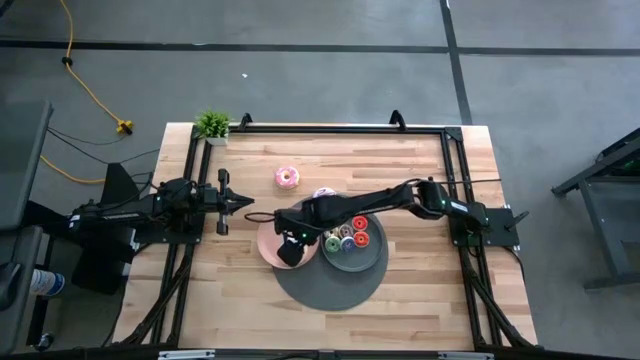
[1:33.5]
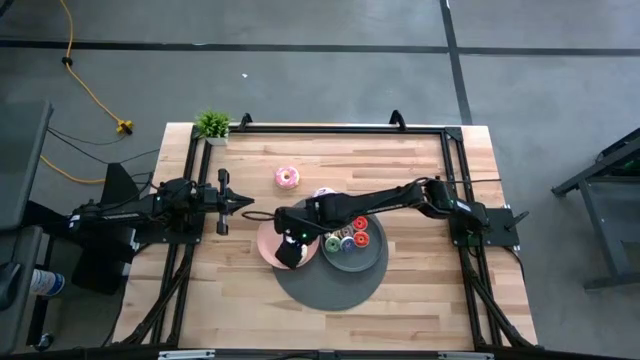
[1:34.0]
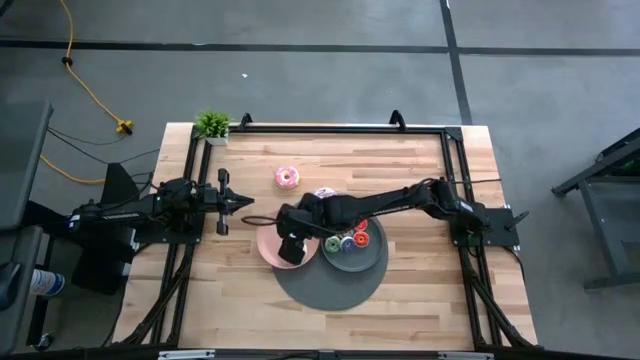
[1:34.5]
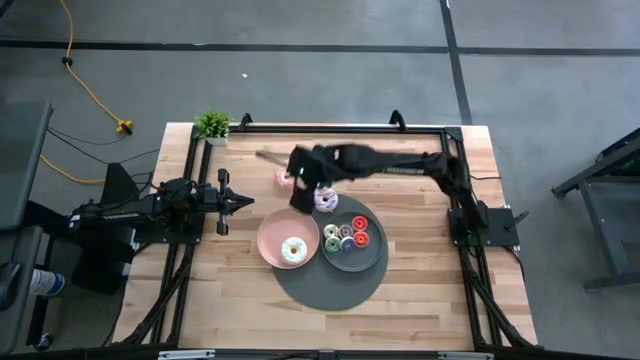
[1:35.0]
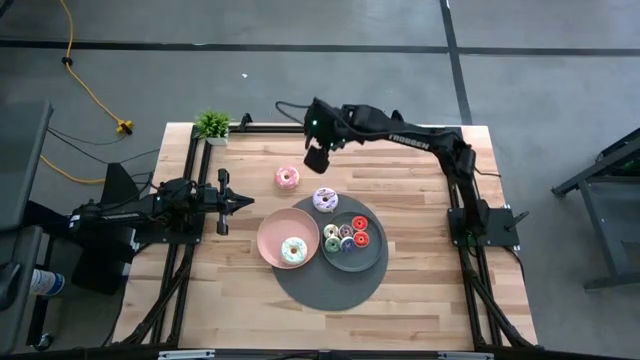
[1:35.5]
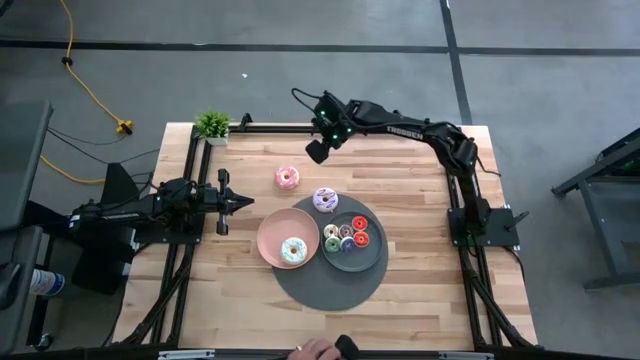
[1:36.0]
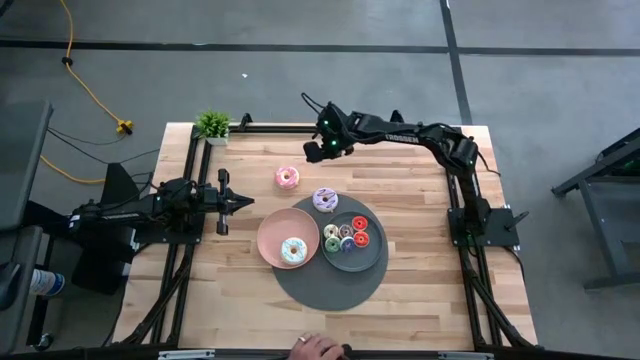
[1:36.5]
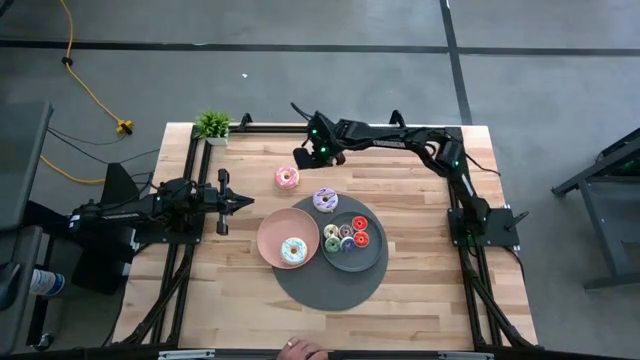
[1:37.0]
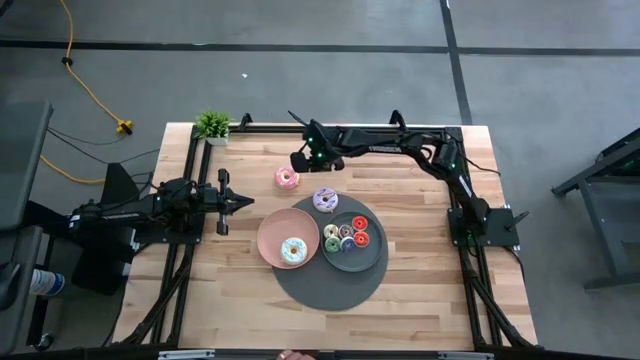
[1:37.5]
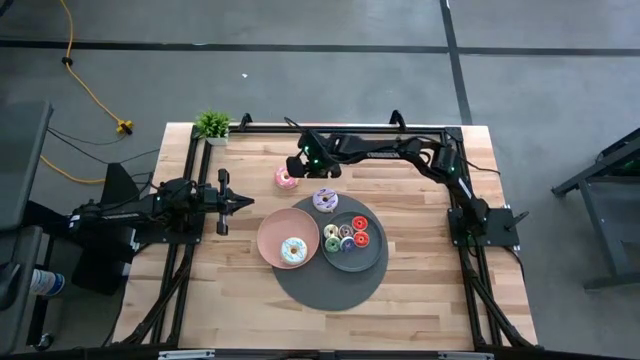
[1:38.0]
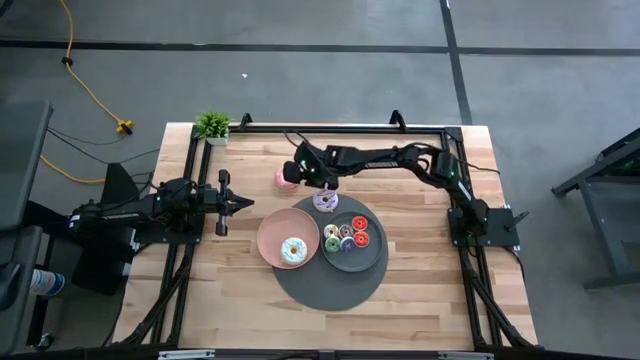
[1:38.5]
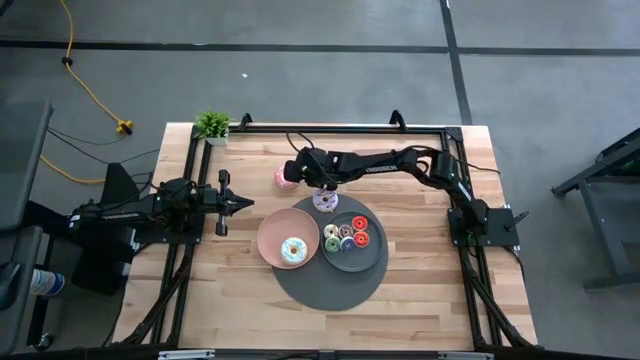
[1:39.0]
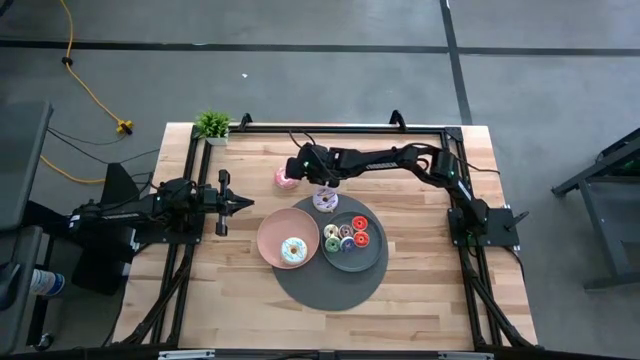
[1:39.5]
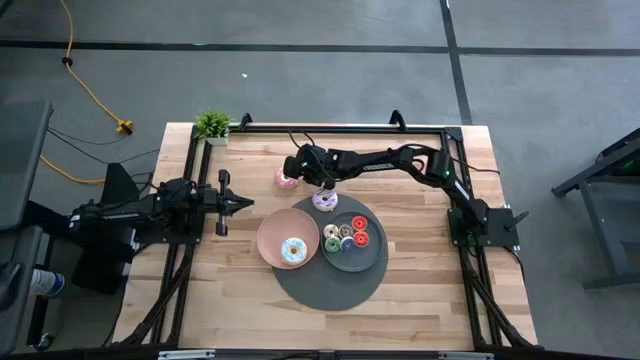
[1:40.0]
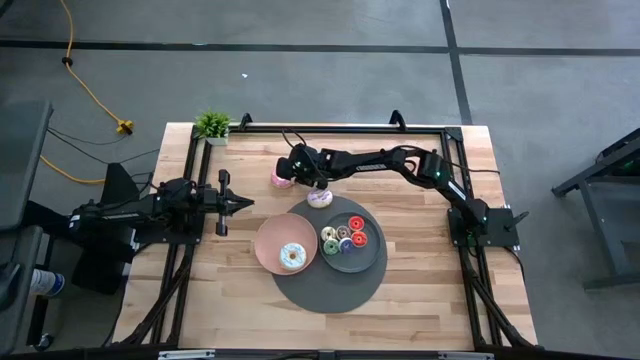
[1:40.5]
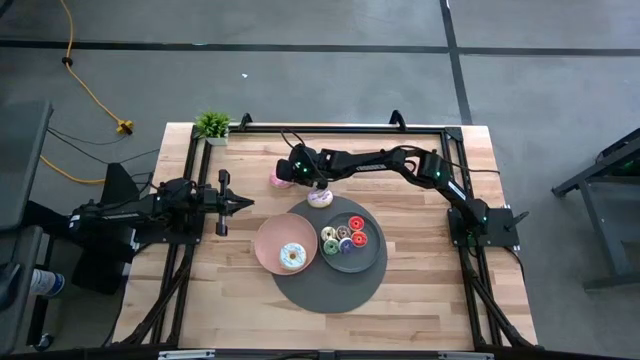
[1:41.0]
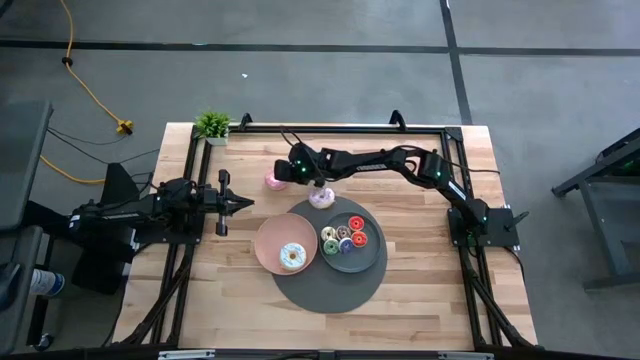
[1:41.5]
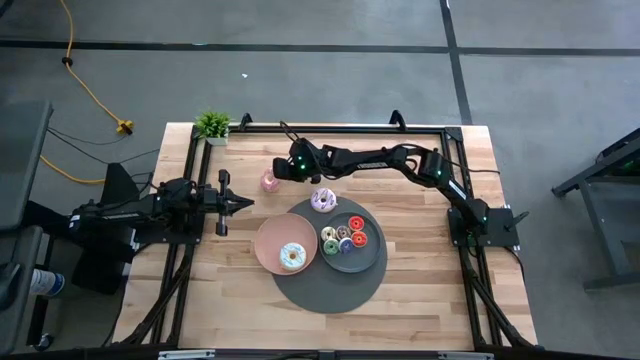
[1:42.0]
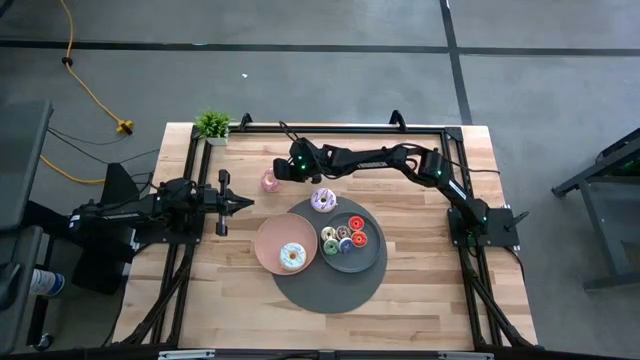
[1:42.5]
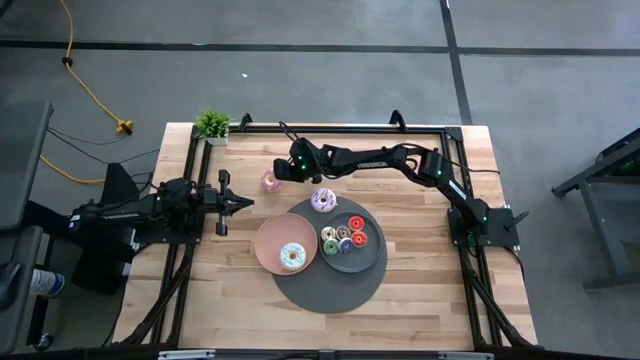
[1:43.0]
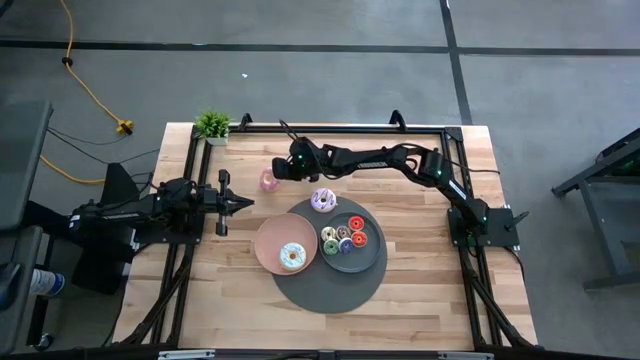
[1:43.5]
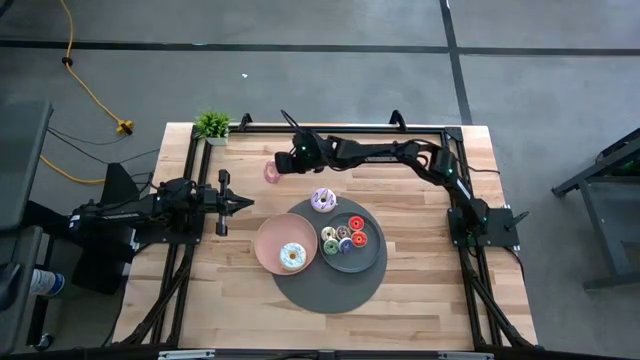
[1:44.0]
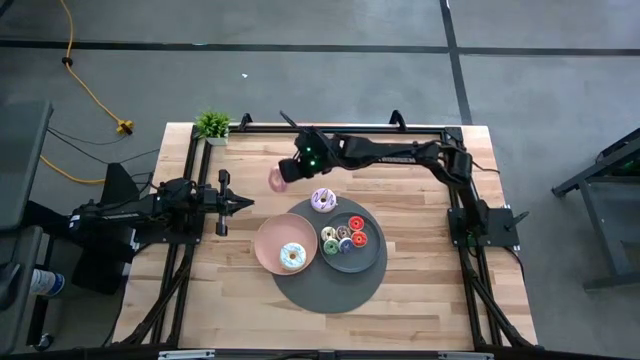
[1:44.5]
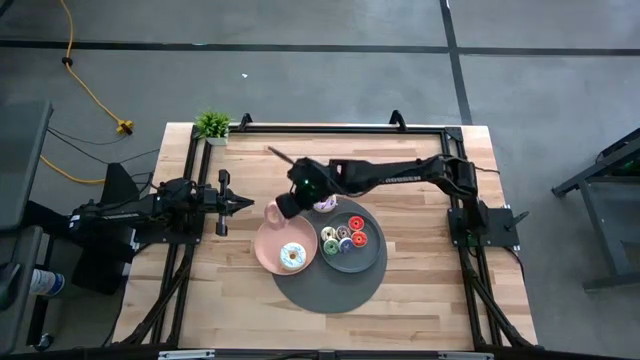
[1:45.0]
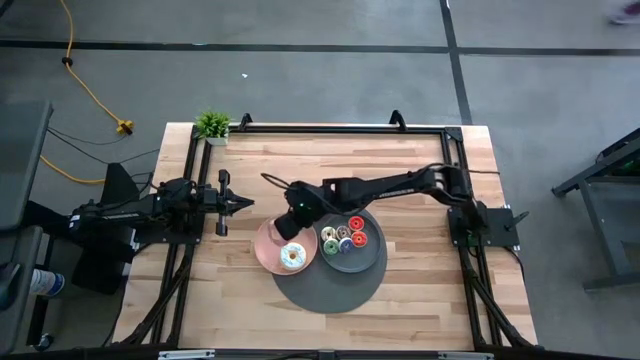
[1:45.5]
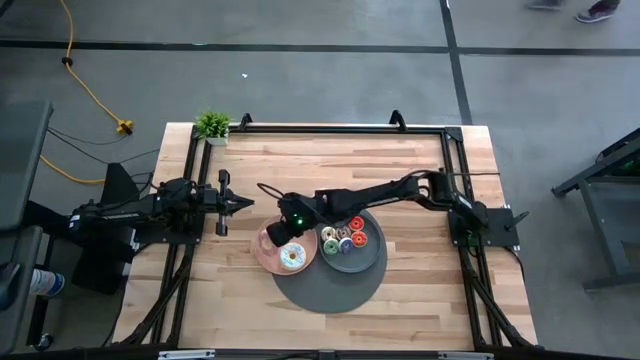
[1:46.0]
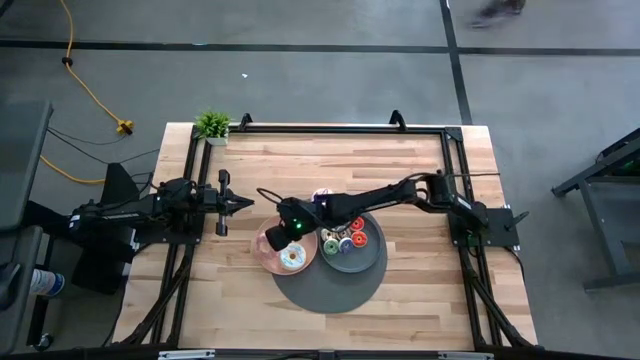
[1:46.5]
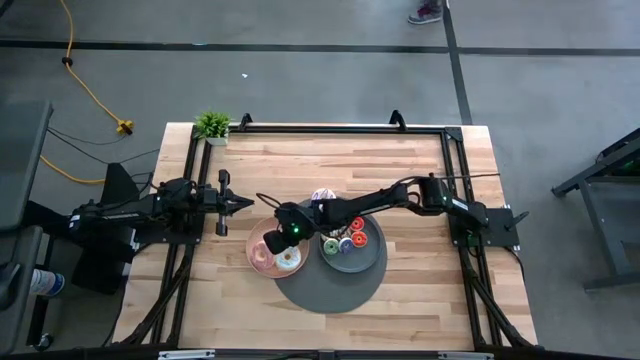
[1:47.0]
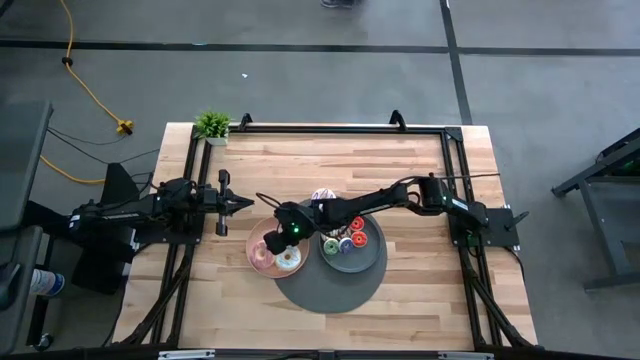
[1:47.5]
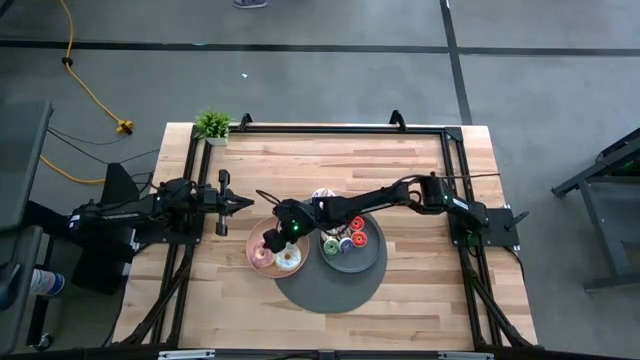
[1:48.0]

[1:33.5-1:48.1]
Task: Pick & Place donuts
Put the big pink donut on the pink plate

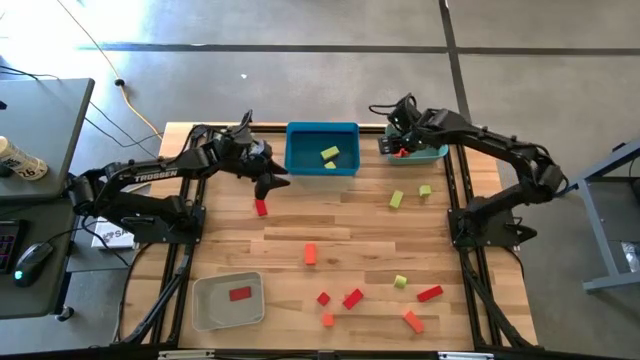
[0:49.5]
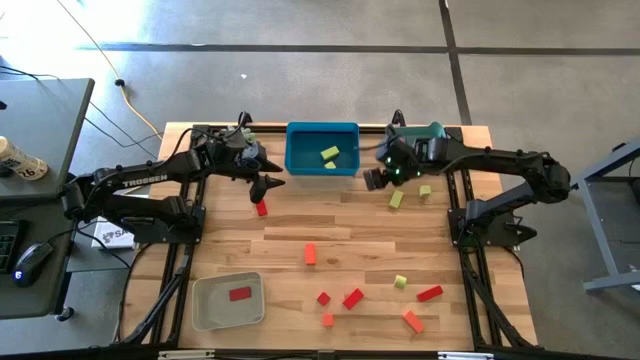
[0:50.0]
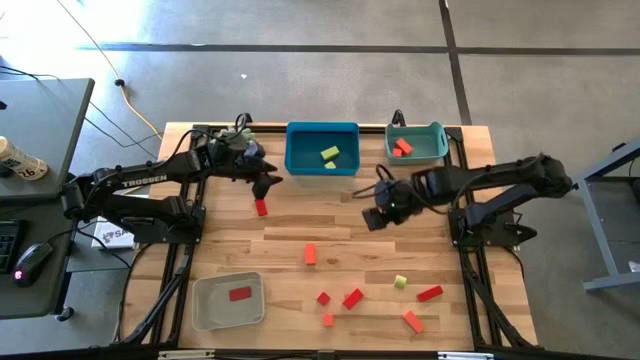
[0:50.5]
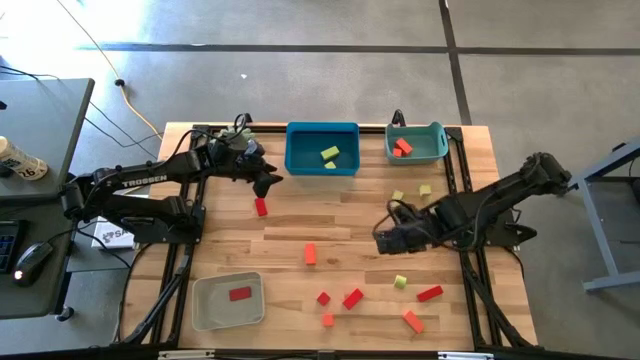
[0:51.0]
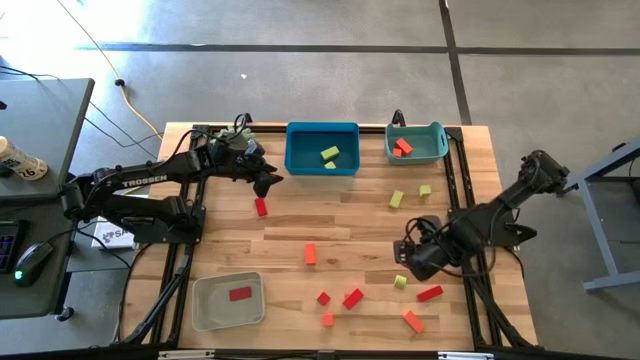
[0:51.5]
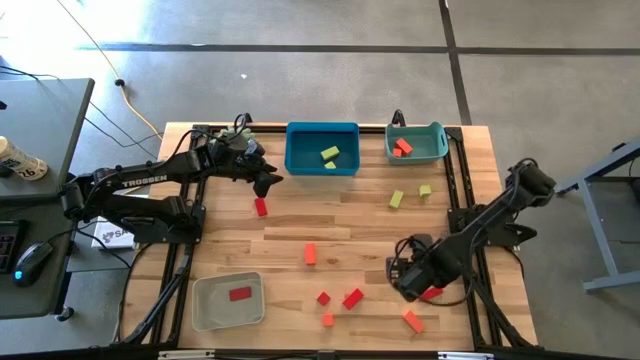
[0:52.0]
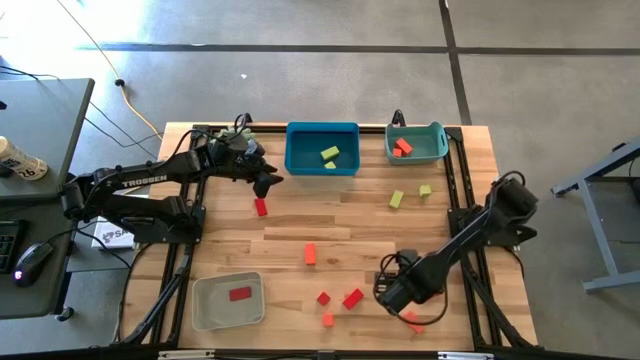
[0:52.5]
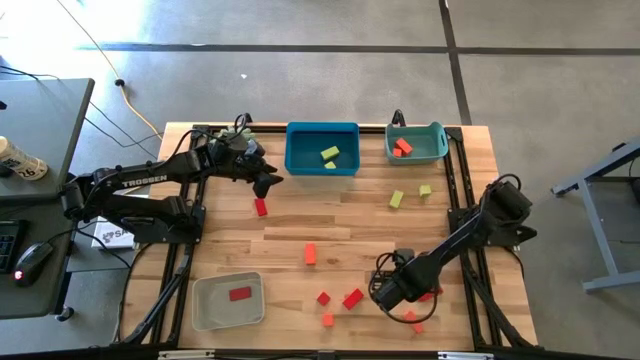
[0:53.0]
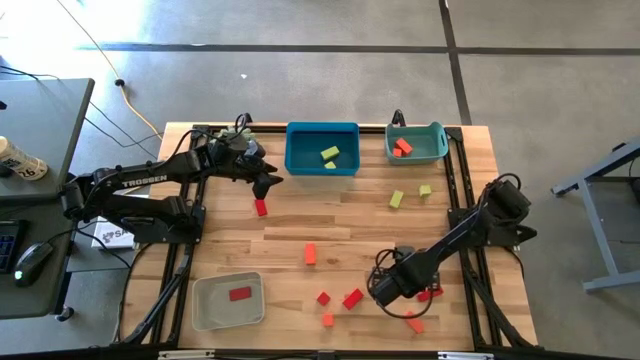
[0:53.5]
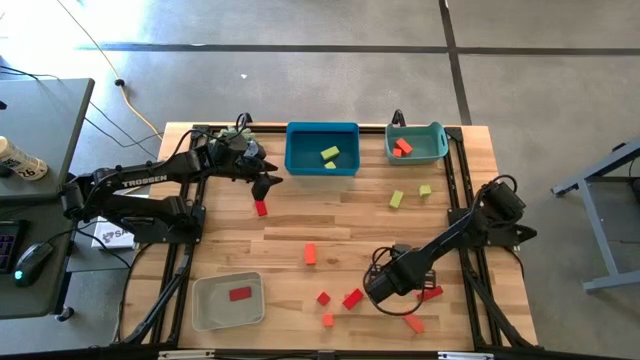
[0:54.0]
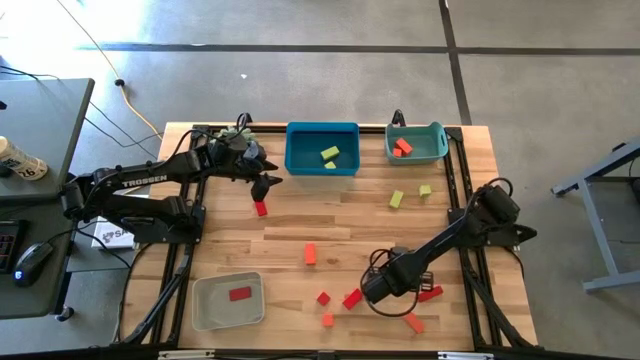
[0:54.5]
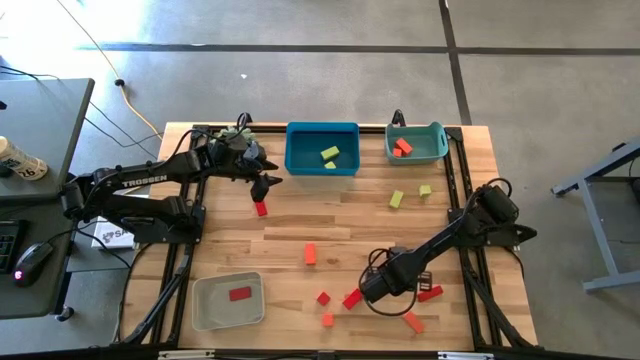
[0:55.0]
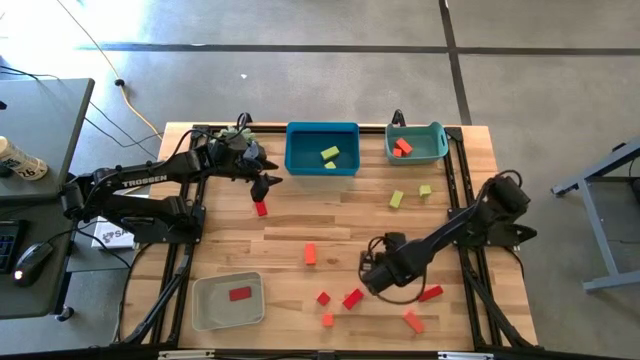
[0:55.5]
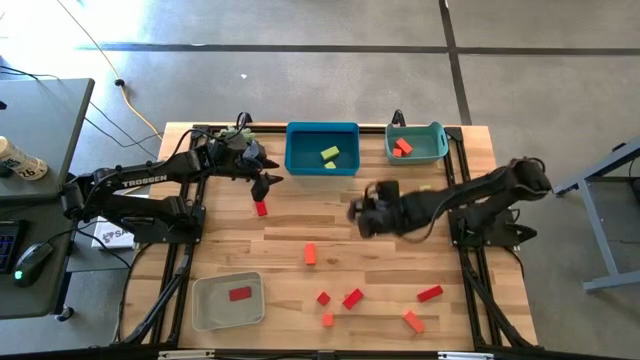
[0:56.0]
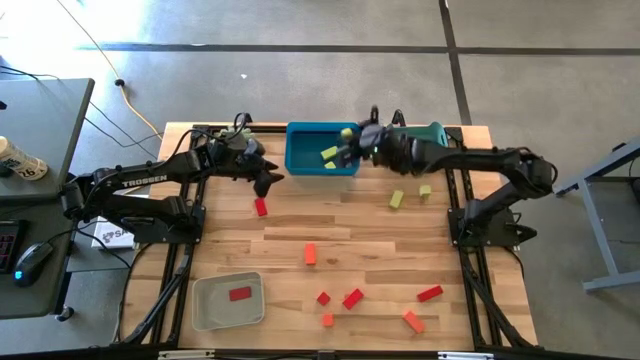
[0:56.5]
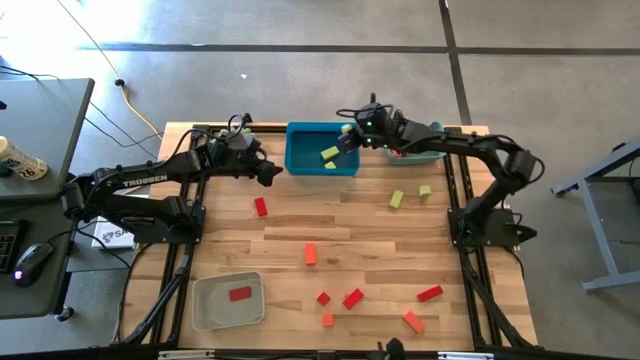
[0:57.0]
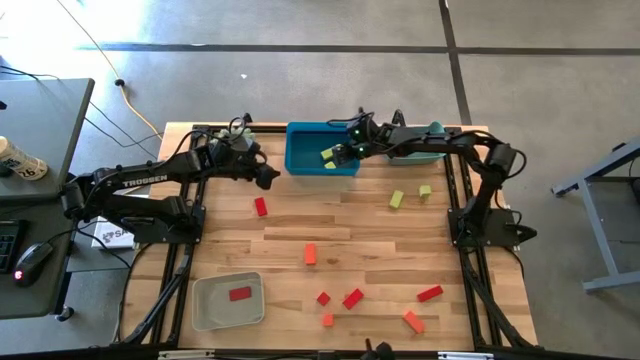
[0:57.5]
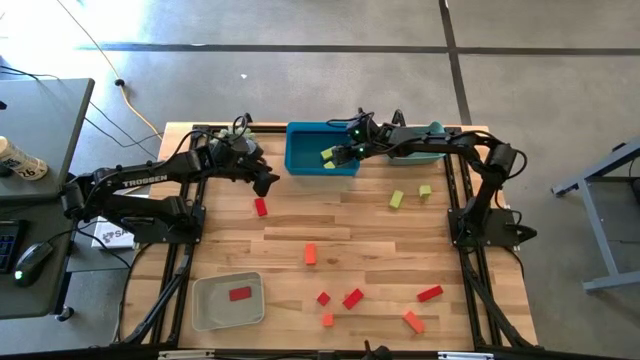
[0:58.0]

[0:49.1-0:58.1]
Task: Sort & place blocks by color
Put the green block into the blue bin
